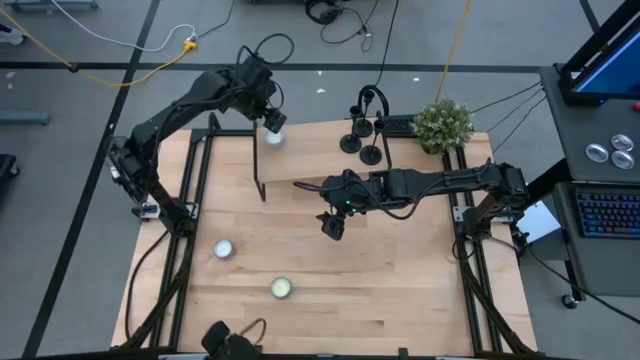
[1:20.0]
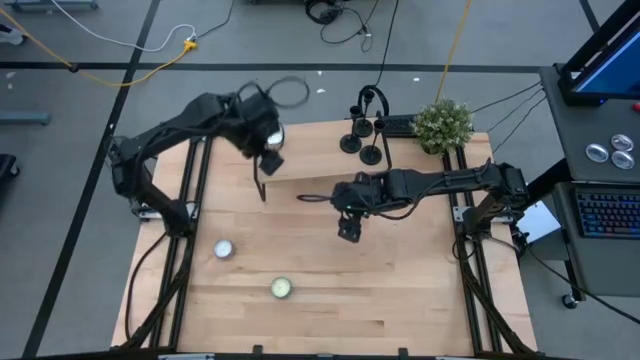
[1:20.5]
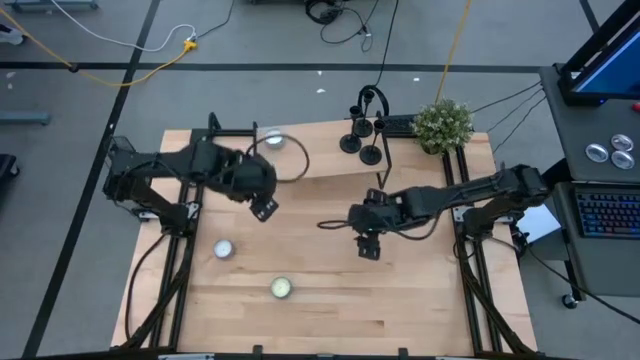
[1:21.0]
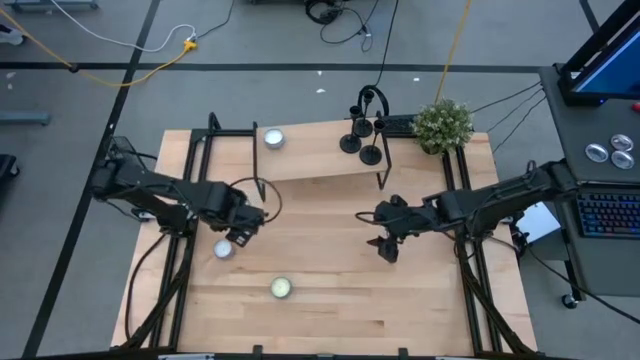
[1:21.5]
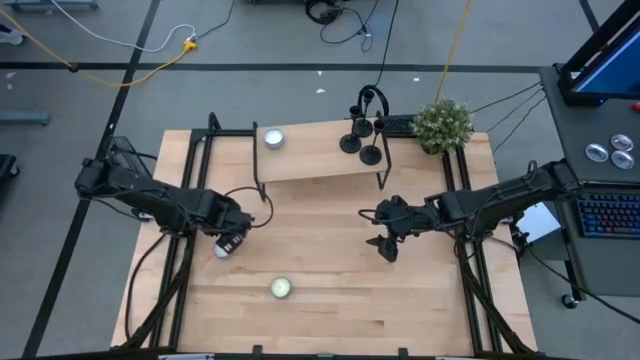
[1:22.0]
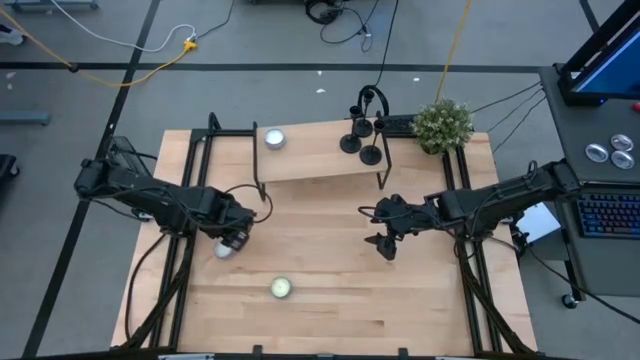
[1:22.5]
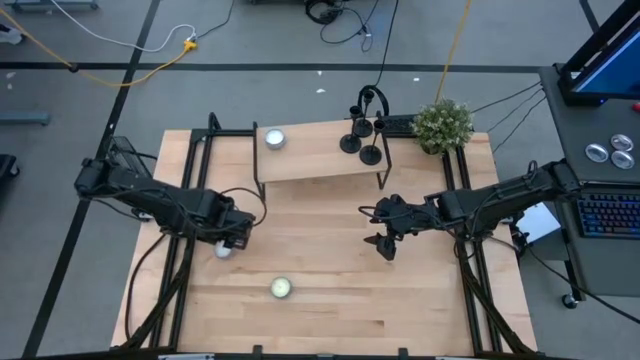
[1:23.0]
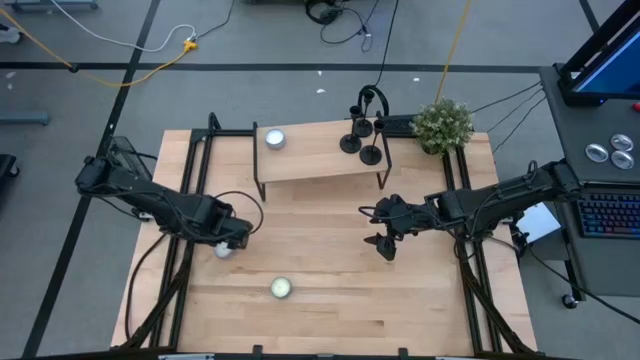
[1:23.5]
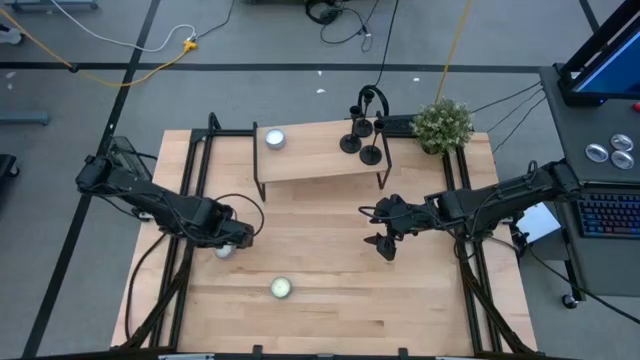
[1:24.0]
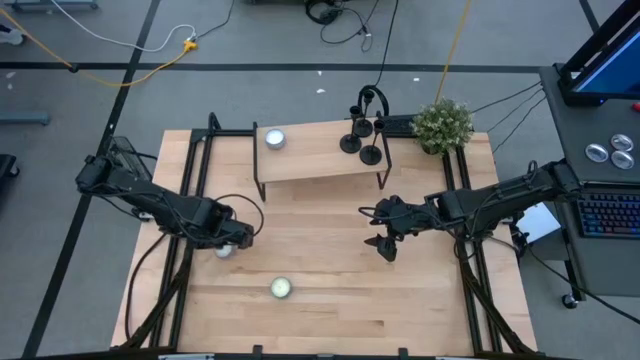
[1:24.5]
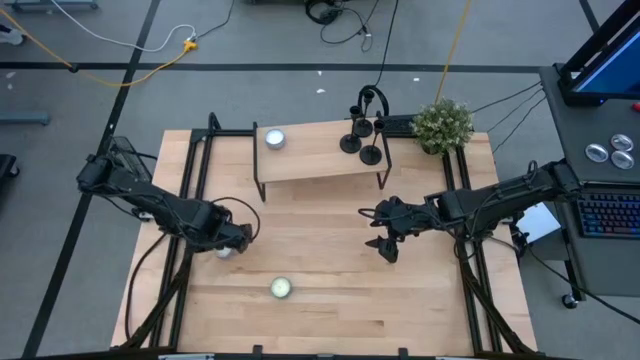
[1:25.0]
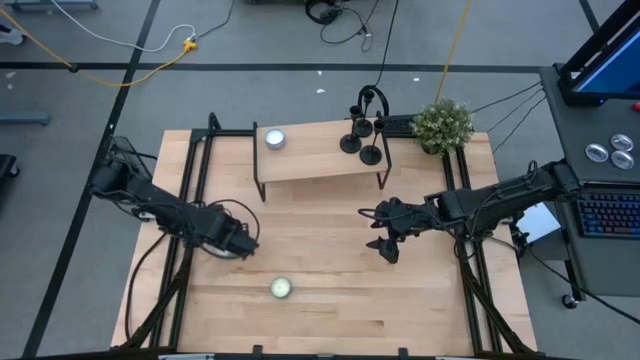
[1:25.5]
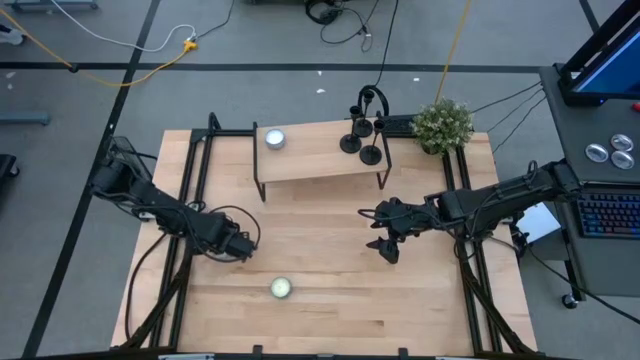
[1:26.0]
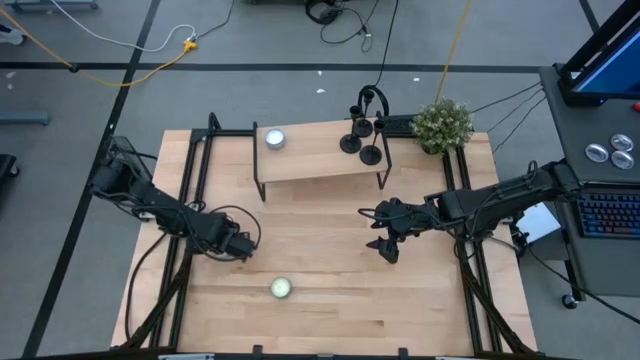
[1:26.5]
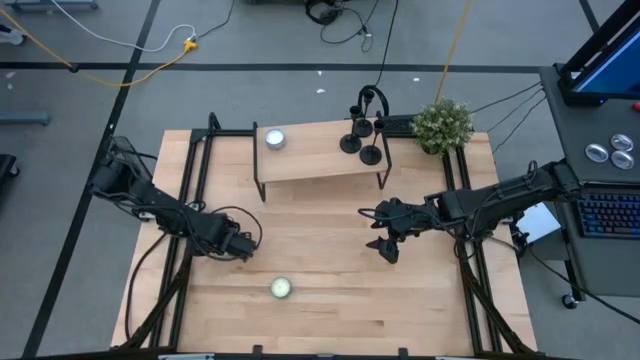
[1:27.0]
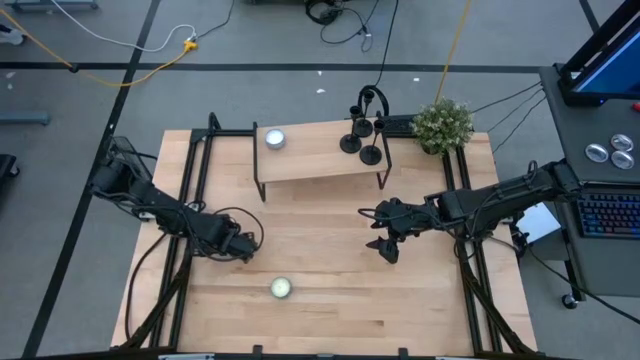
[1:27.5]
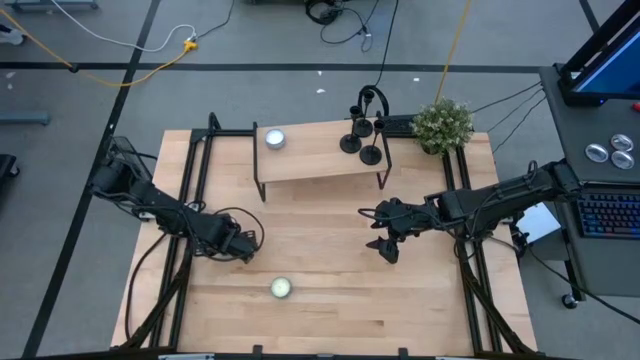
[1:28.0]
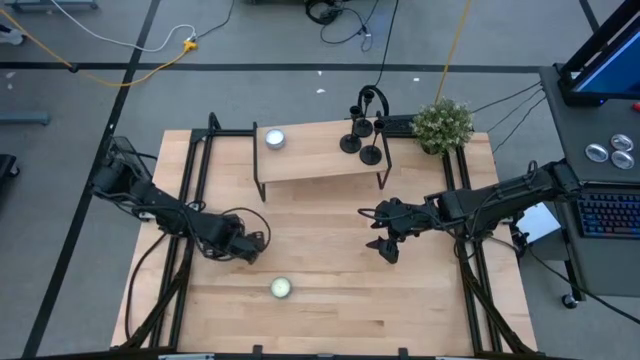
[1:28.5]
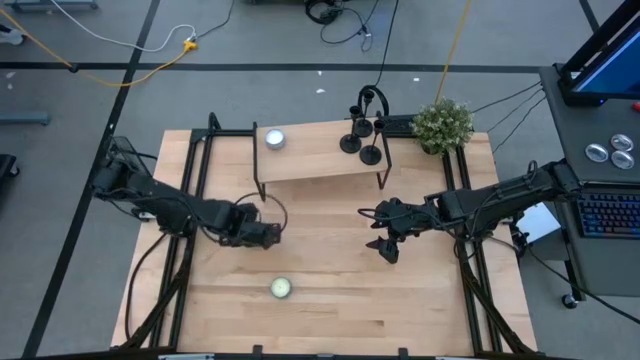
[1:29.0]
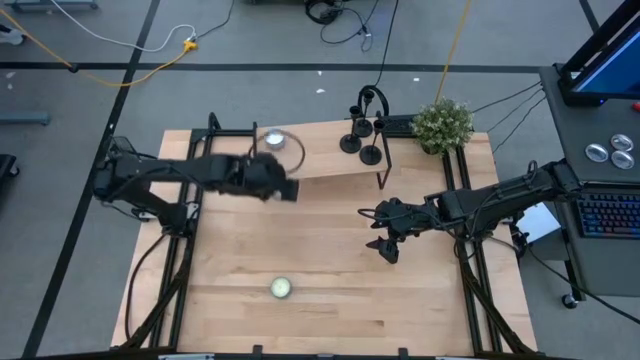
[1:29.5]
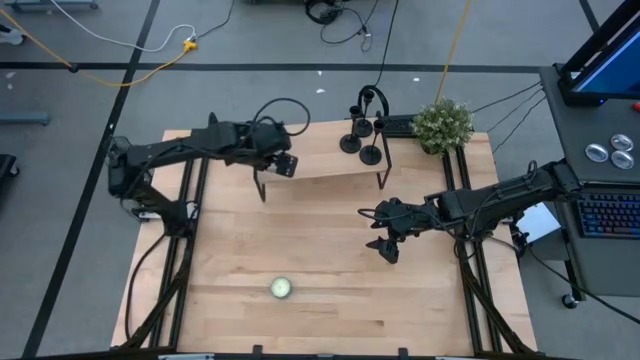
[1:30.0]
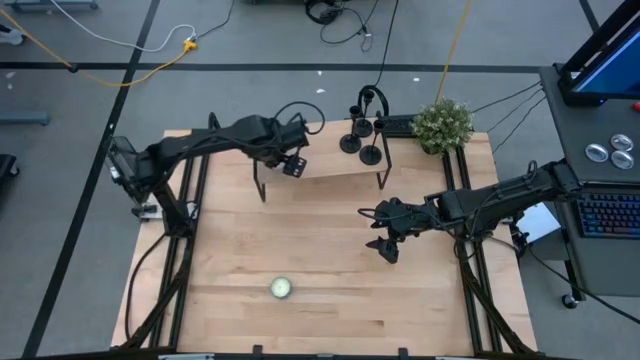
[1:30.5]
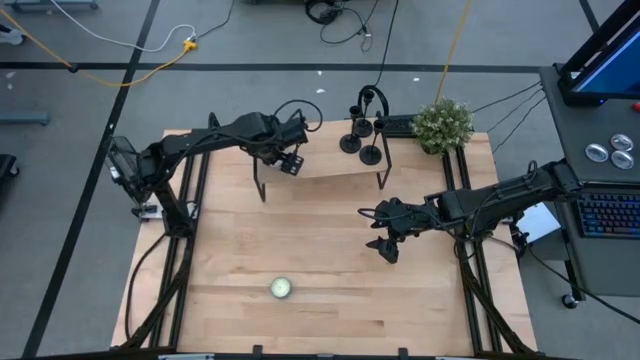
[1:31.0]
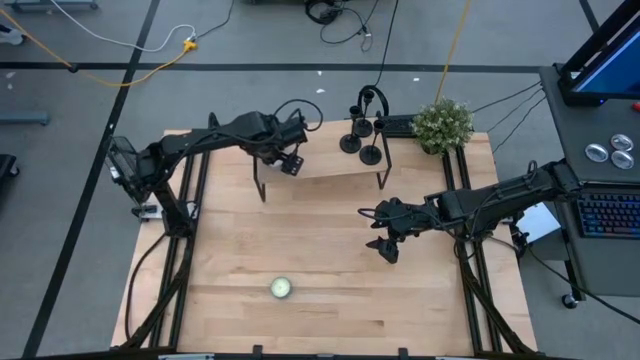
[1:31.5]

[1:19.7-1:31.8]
Task: Pick & Place candle stick holders
Put the purple candle on the shelf

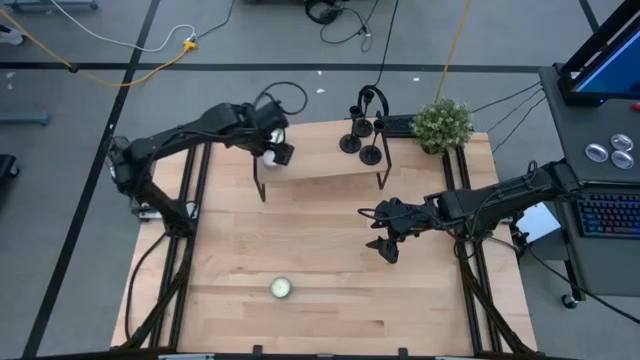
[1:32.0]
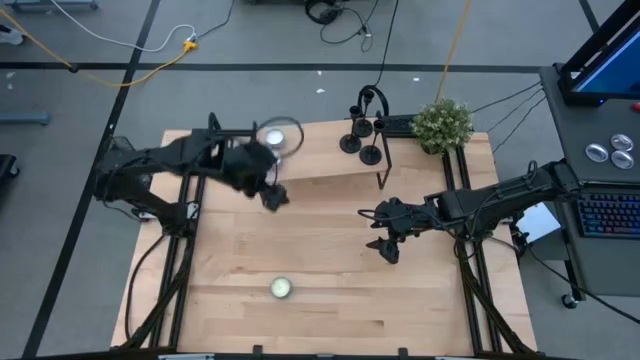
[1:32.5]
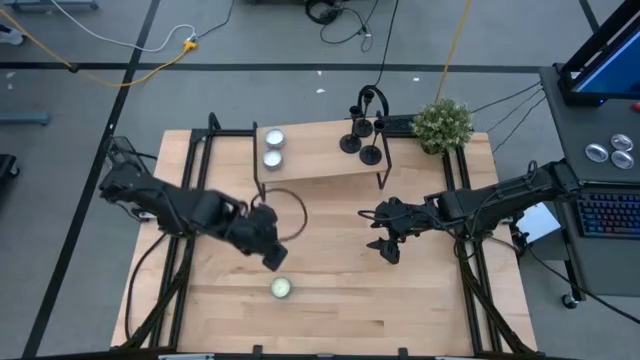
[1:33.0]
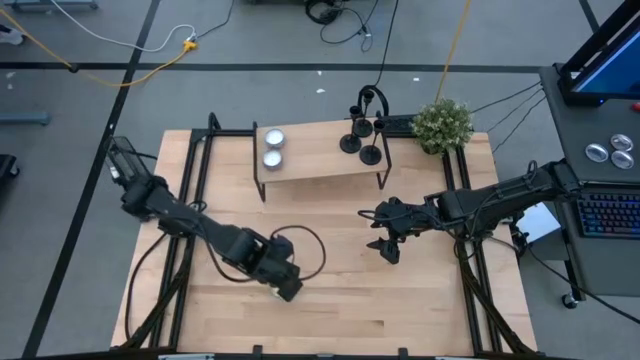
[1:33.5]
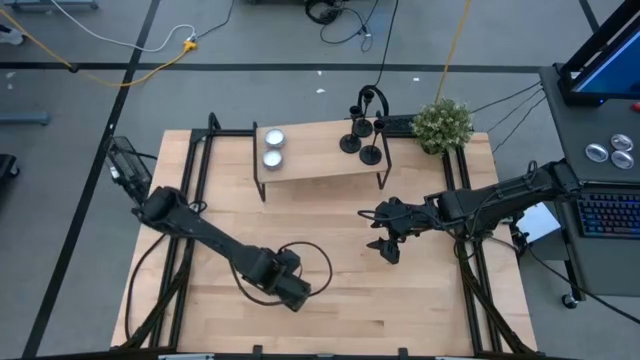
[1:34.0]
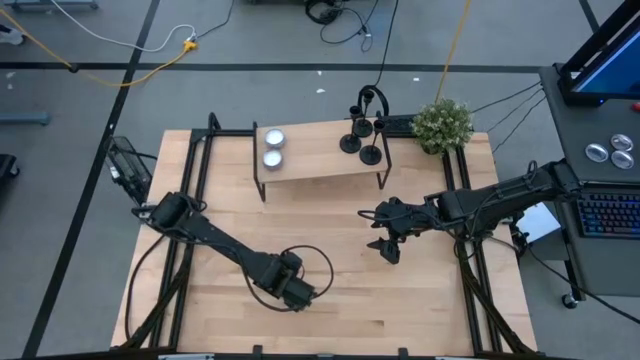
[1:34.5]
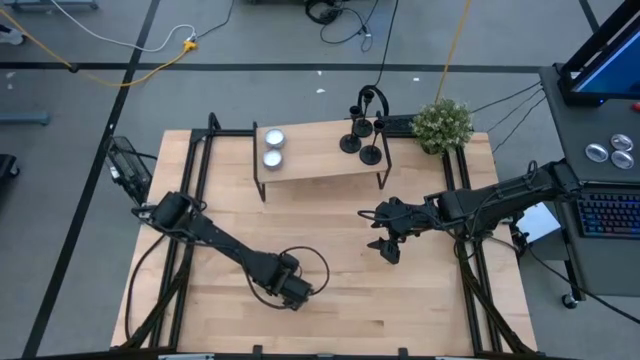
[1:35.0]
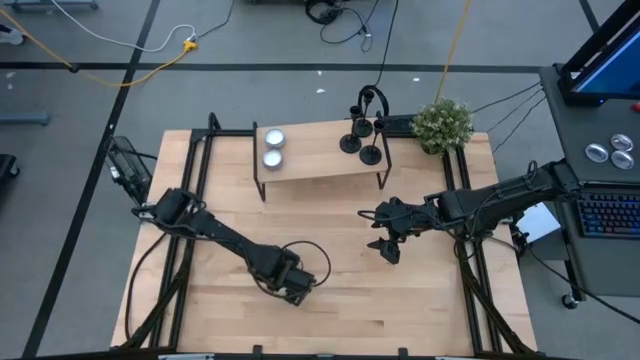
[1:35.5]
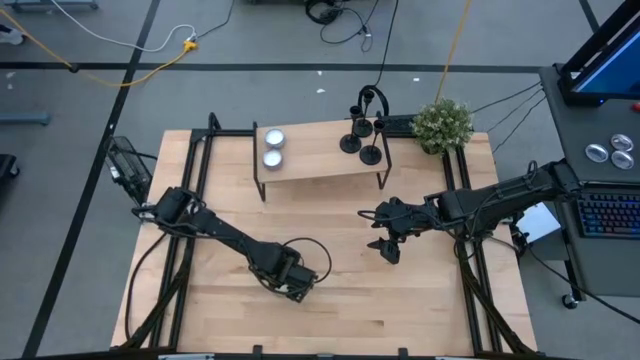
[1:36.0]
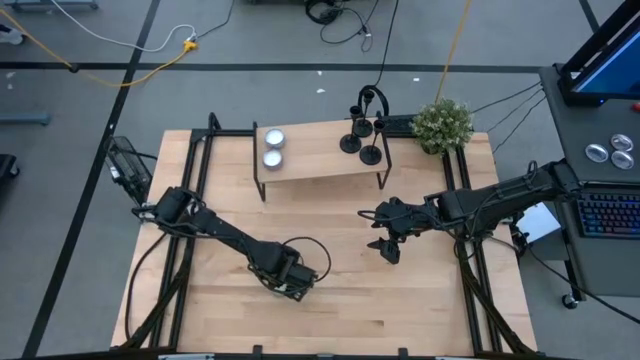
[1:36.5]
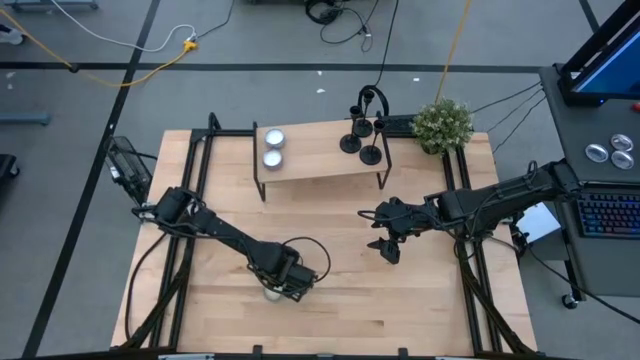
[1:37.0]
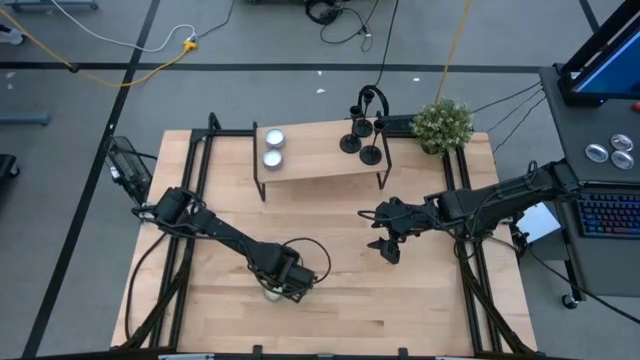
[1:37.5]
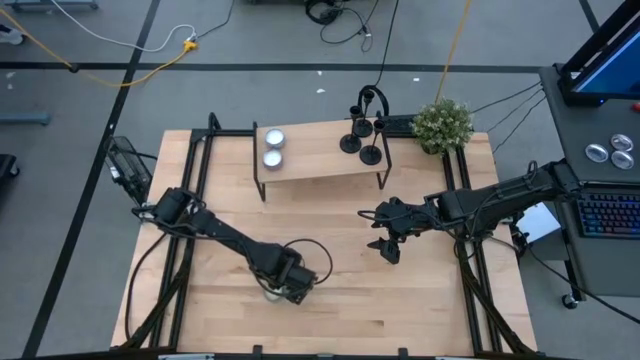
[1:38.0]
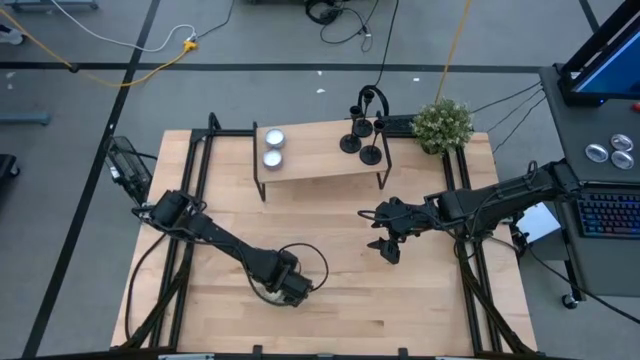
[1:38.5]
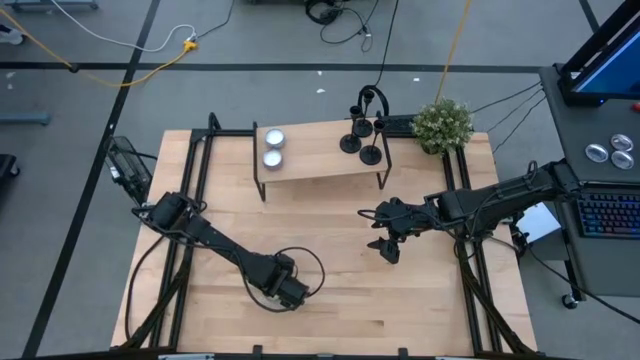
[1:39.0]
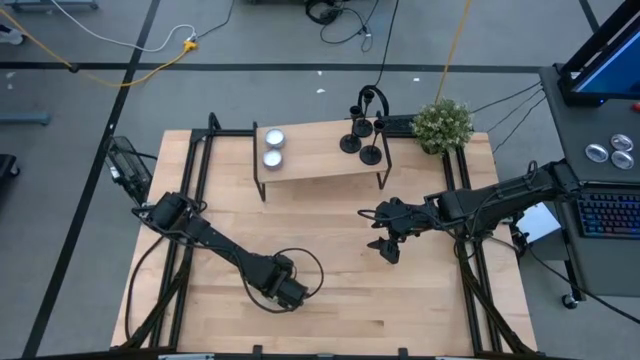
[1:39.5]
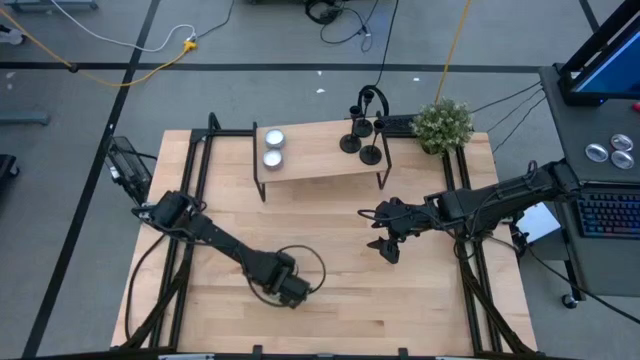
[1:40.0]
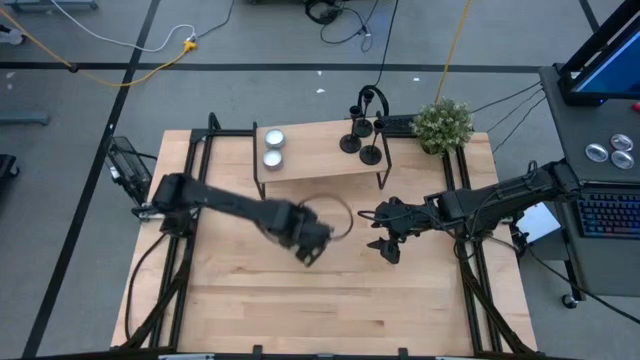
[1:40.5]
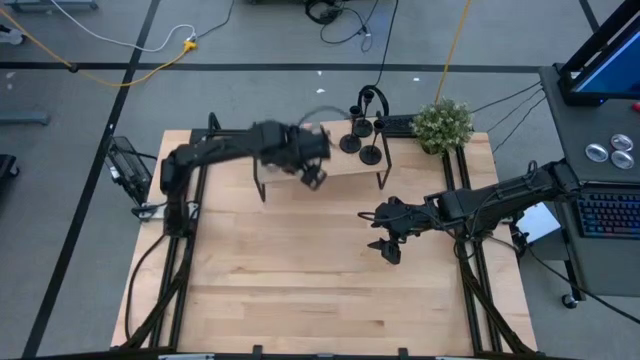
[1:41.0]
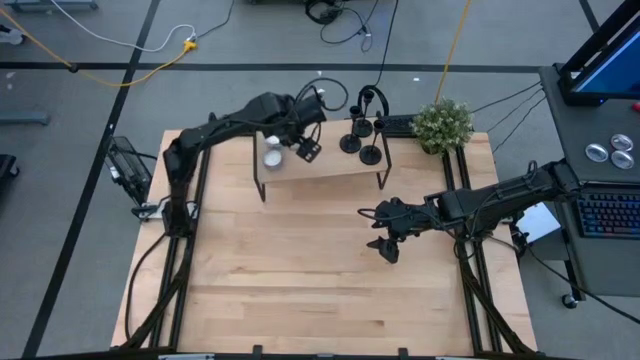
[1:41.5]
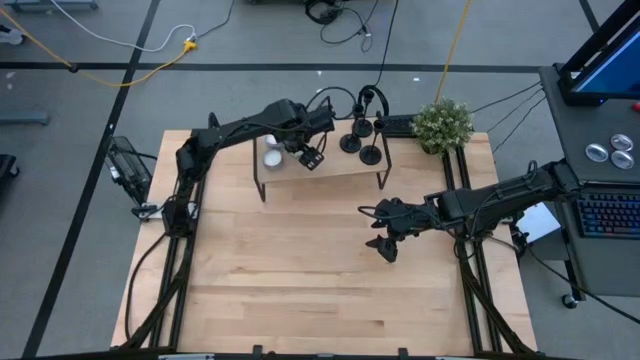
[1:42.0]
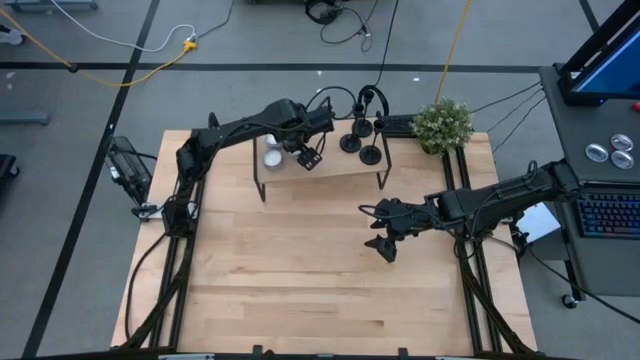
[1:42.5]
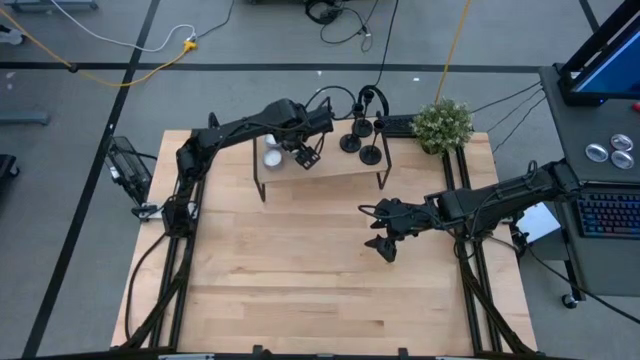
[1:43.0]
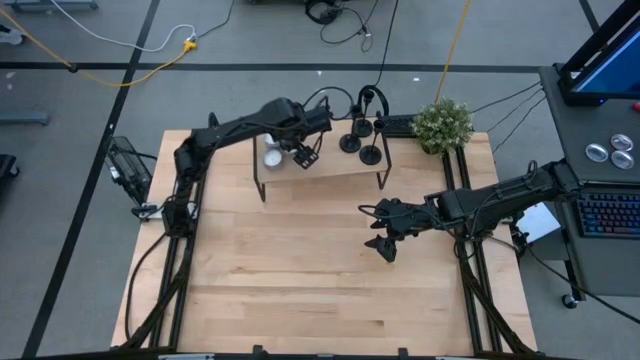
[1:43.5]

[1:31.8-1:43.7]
Put the blue candle on the shelf
